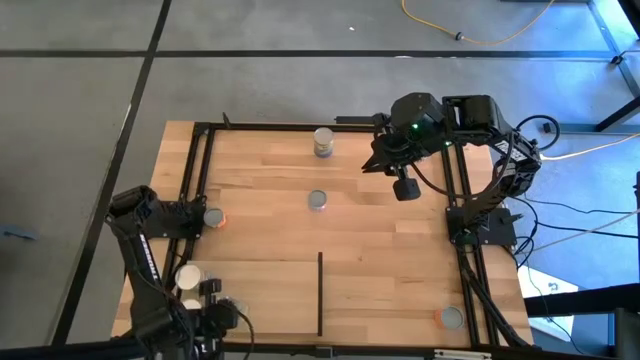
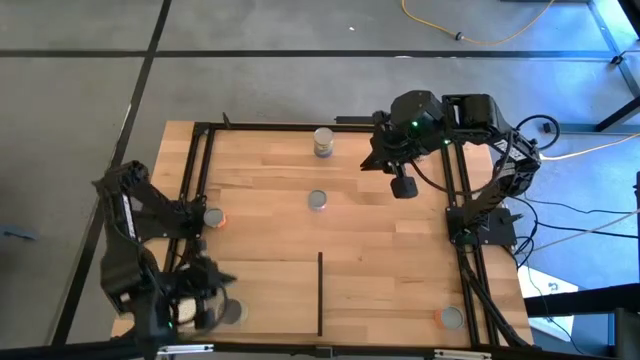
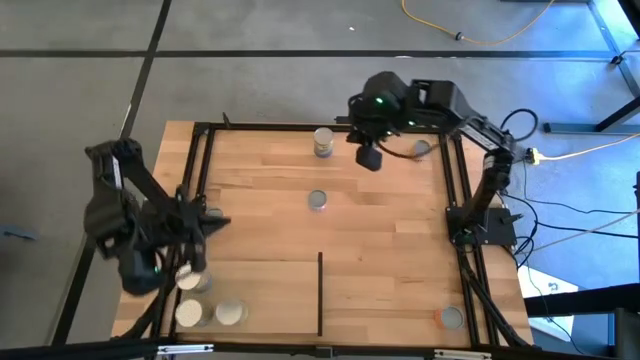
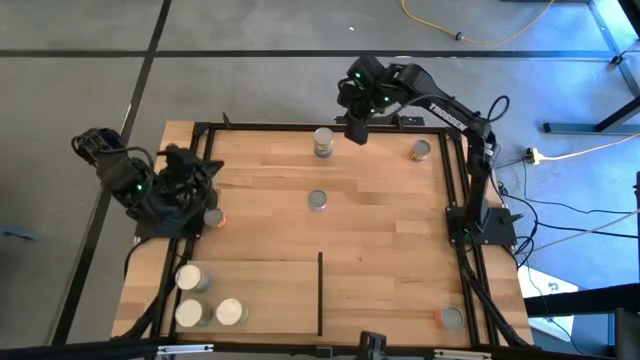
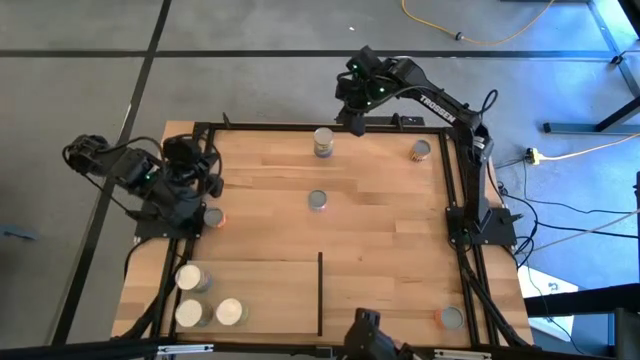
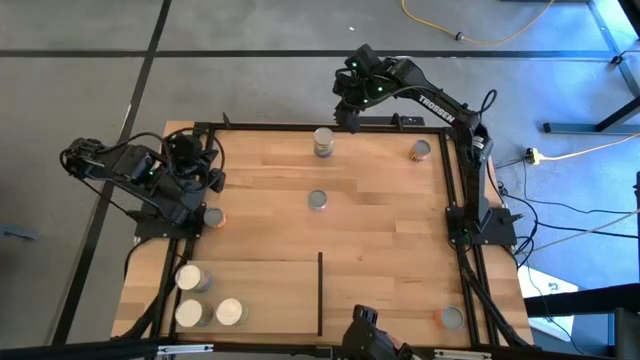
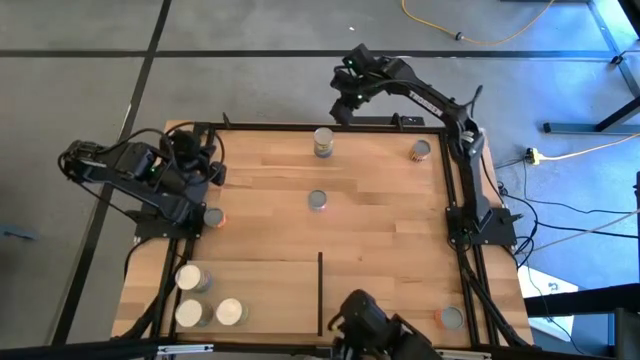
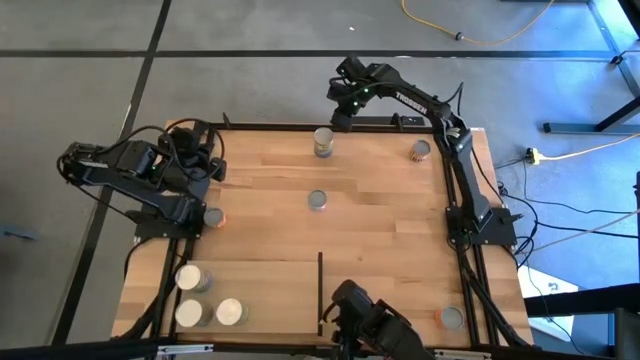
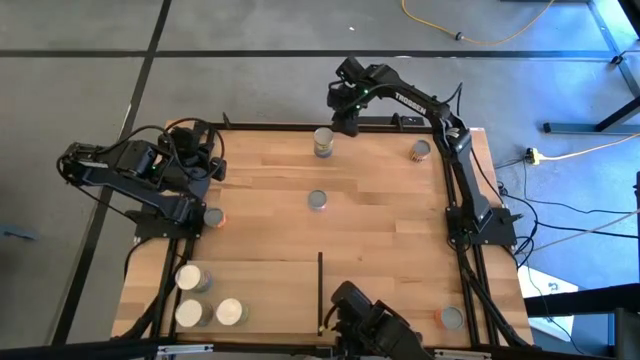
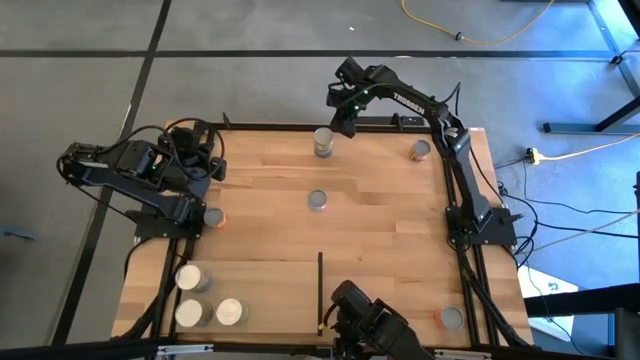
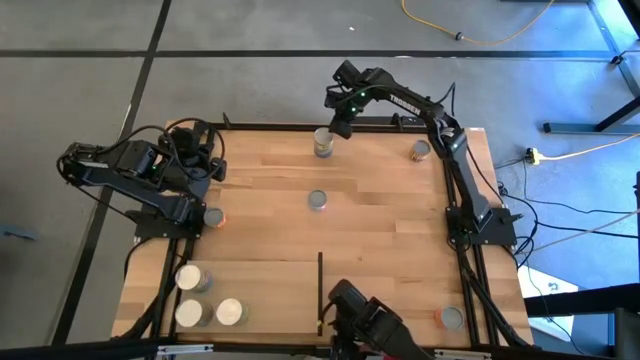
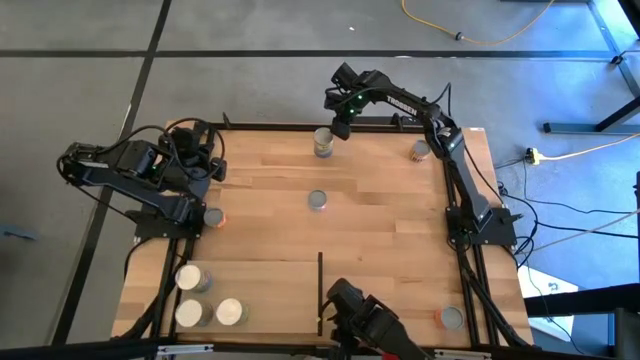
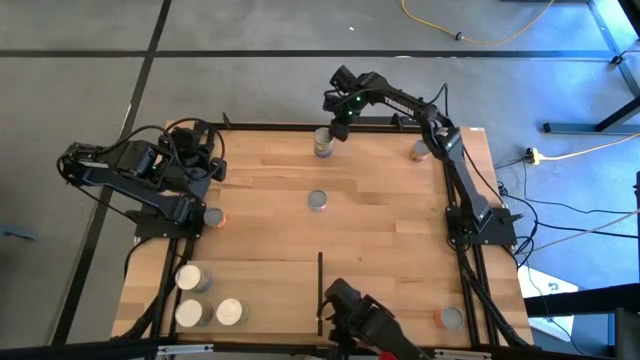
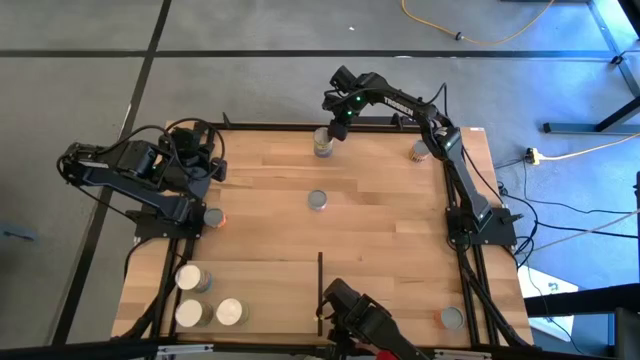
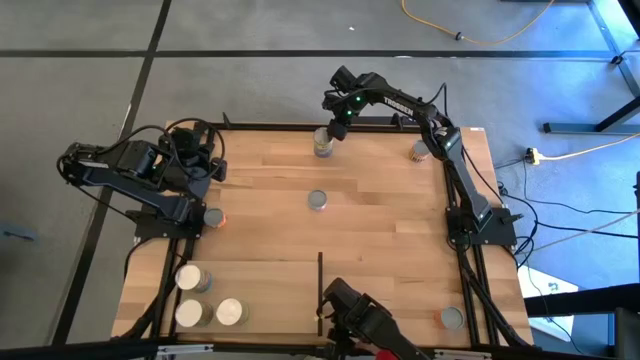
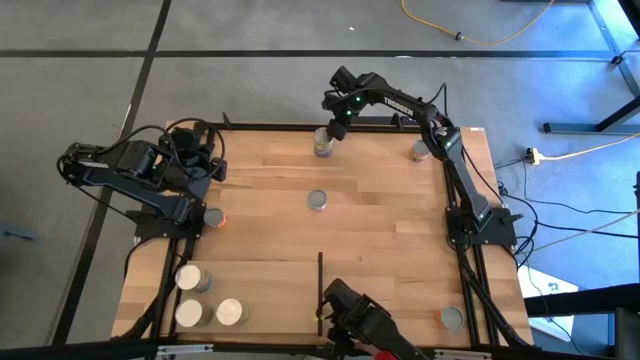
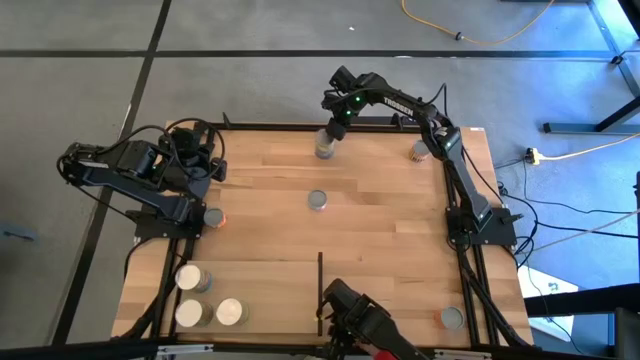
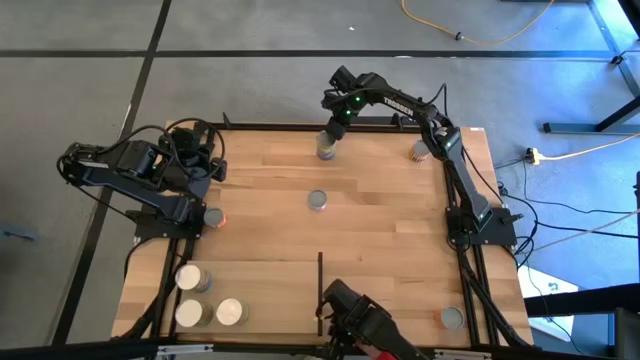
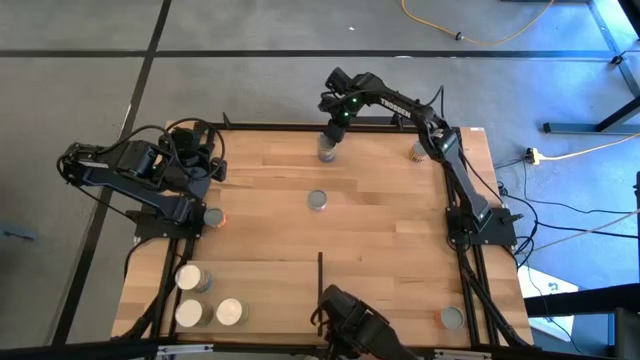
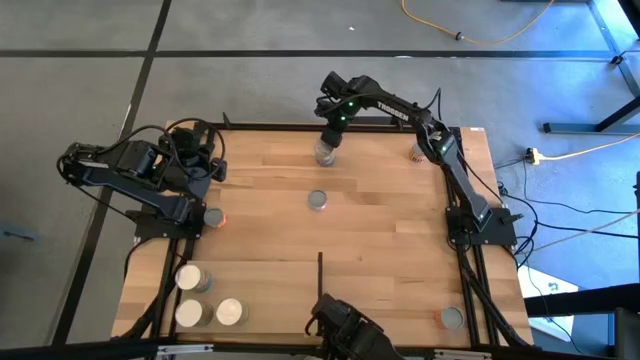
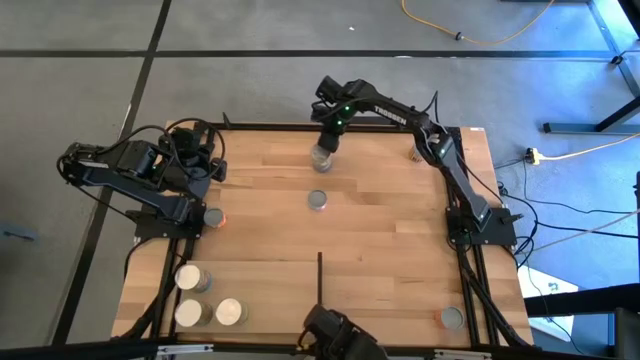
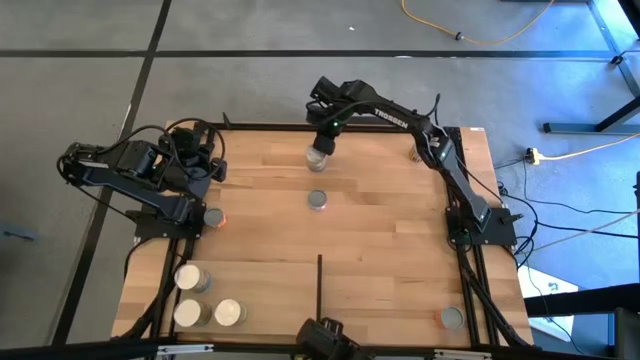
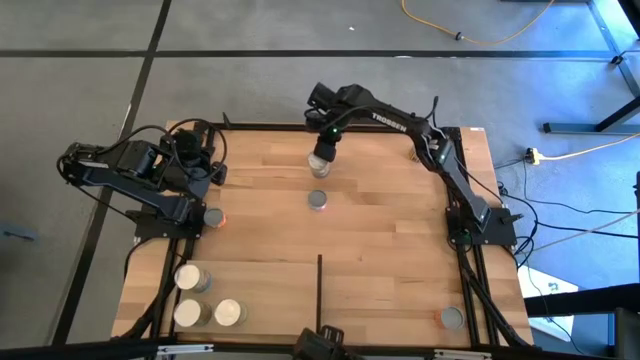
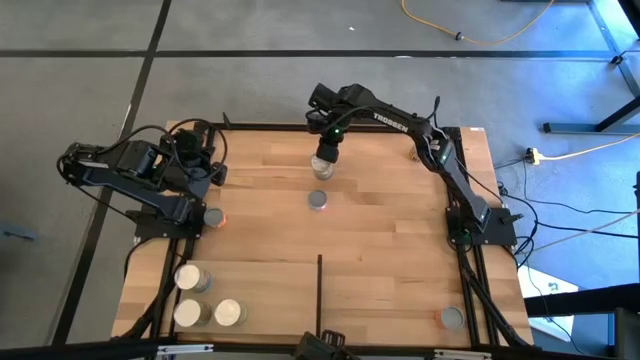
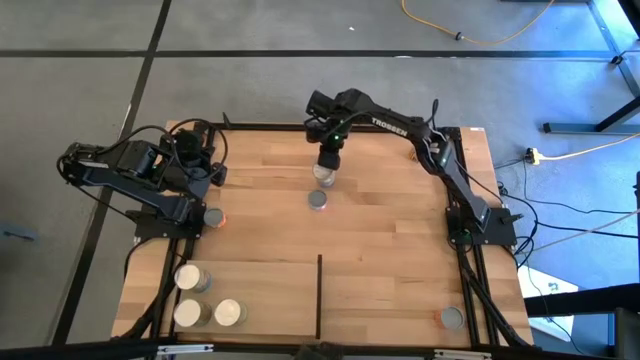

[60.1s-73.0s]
Task: Pick and place cans onto a shelf
Put the canned peas on the shelf

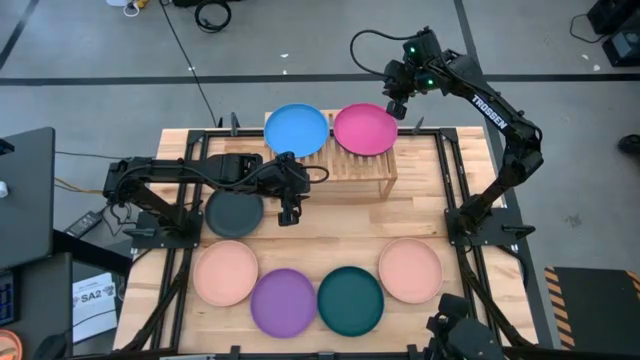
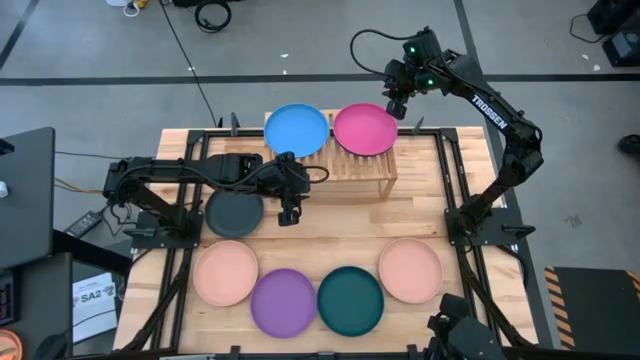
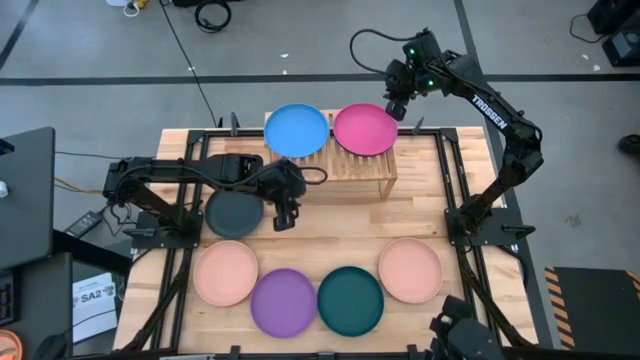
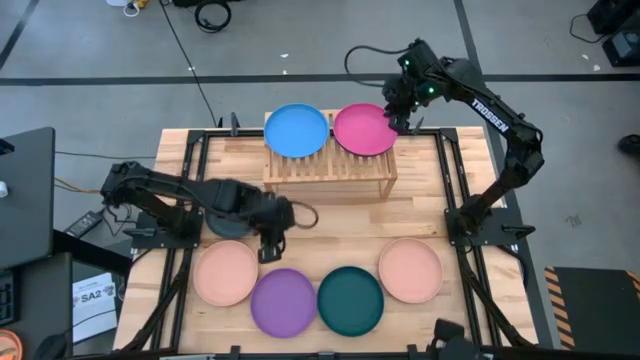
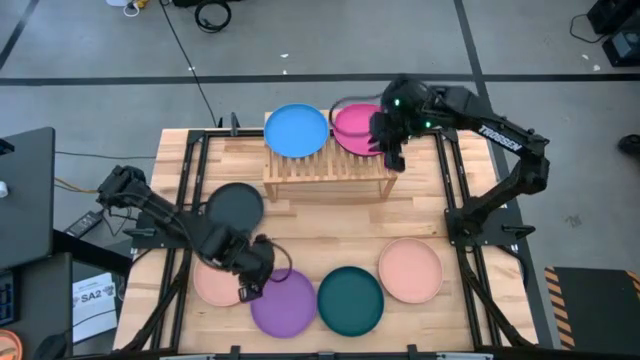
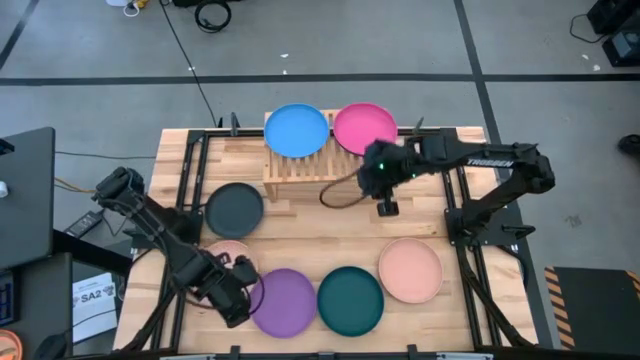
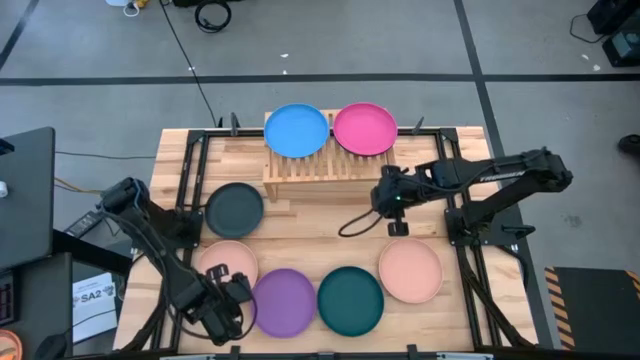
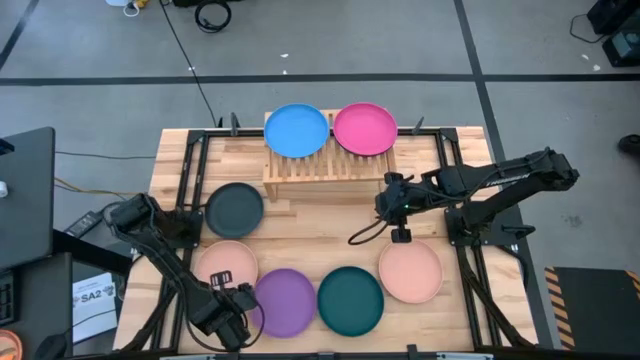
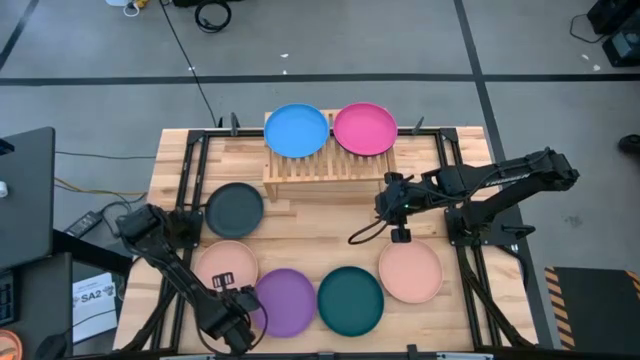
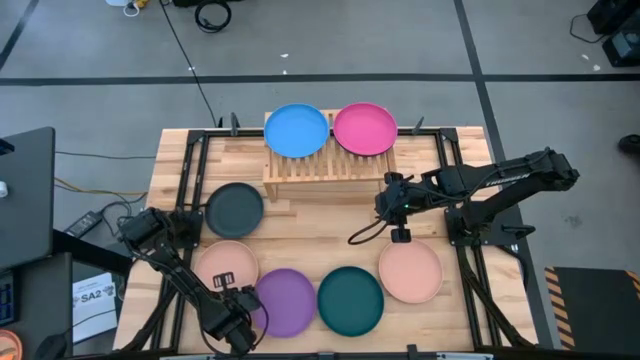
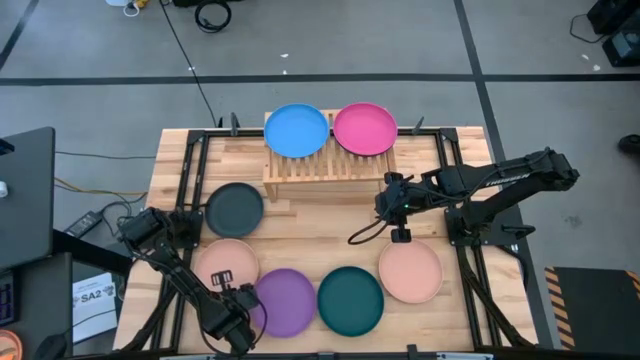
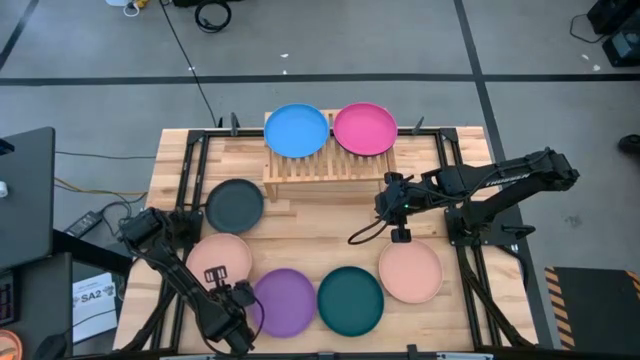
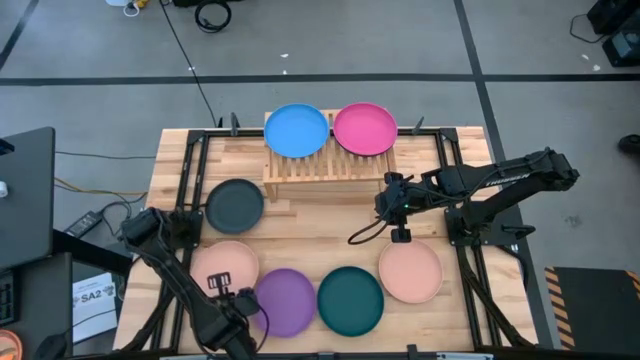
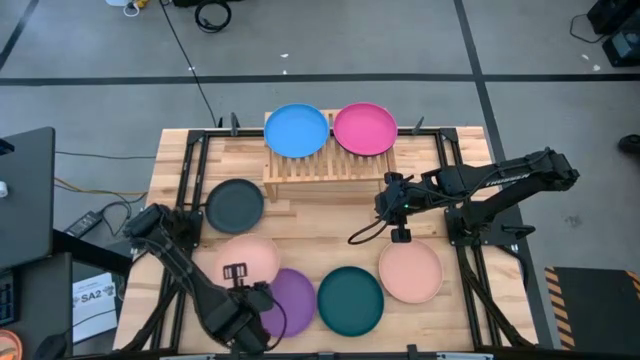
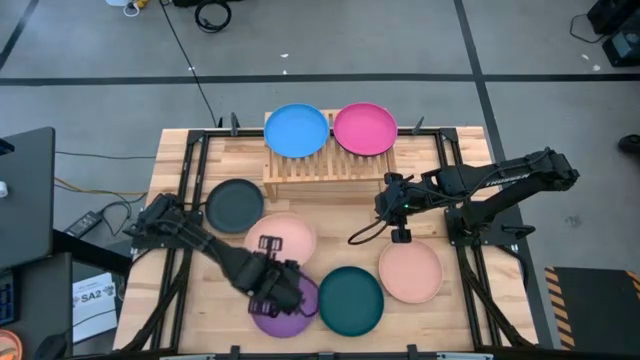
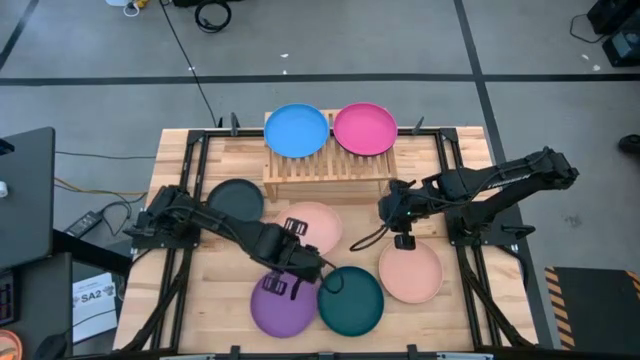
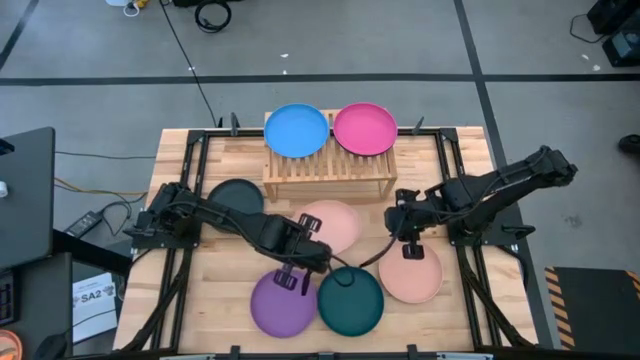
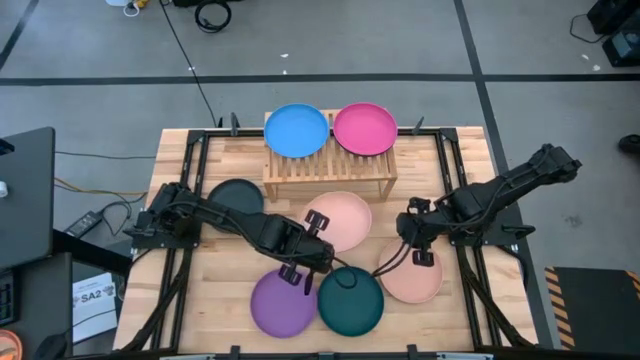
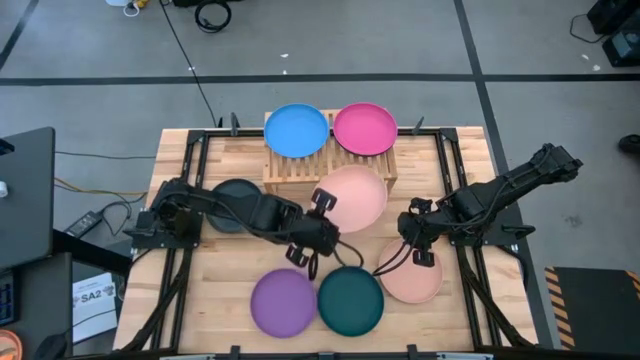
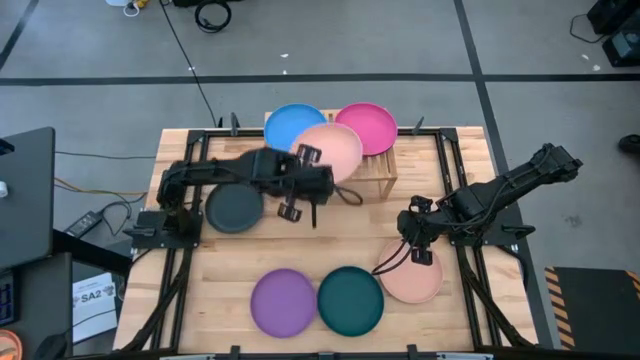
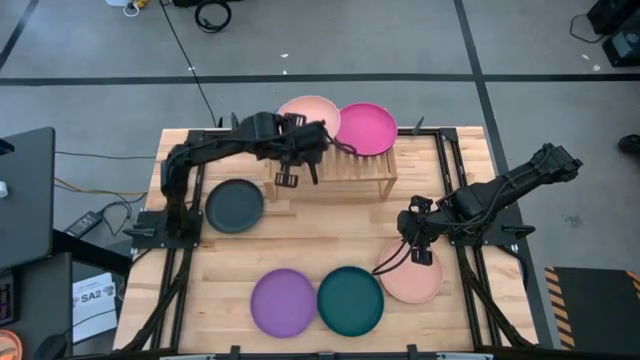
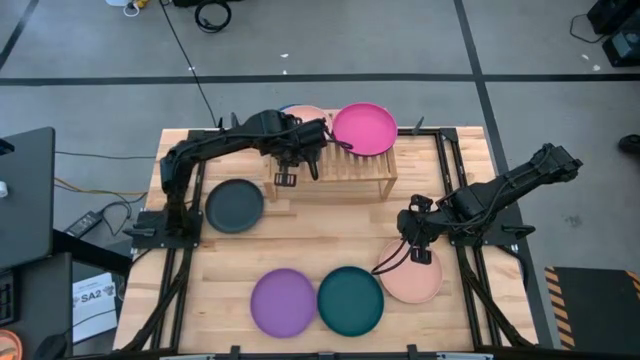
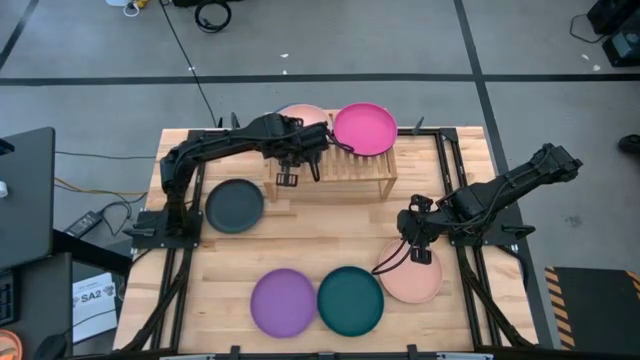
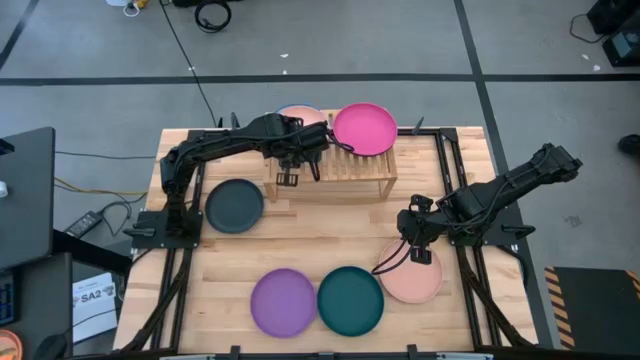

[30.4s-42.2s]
Task: Place and stack plates onto a shelf
Stack the left light orange plate on the blue plate on the shelf
